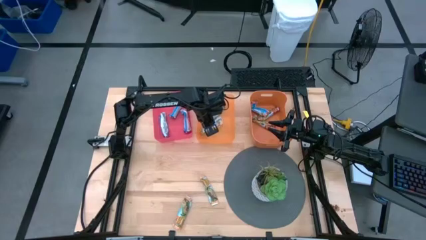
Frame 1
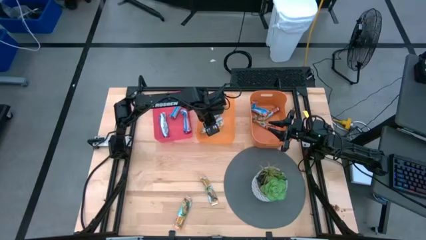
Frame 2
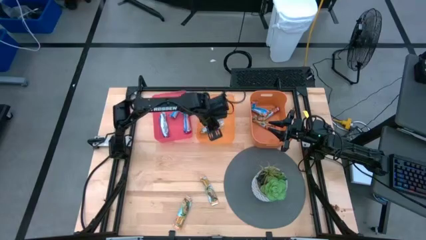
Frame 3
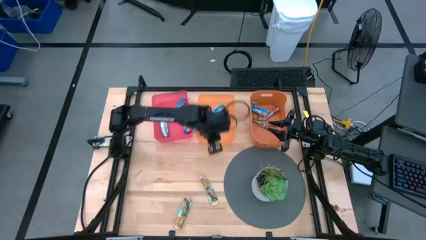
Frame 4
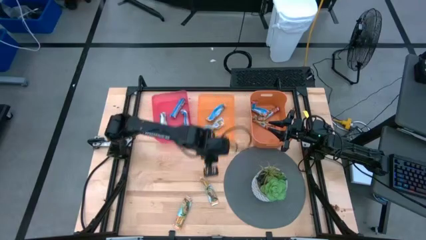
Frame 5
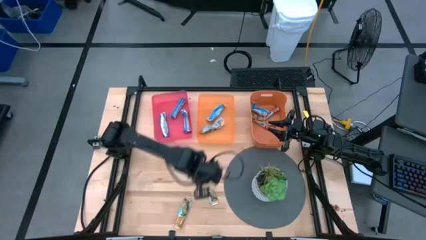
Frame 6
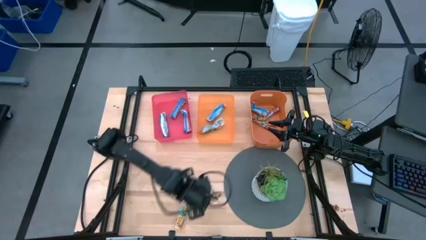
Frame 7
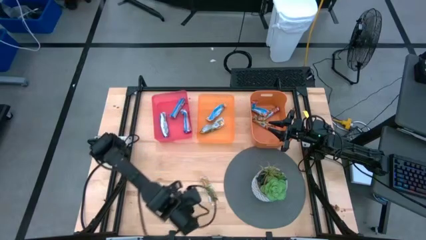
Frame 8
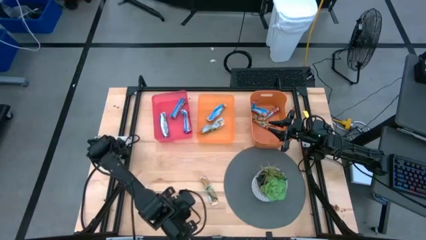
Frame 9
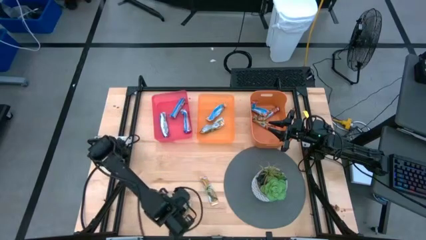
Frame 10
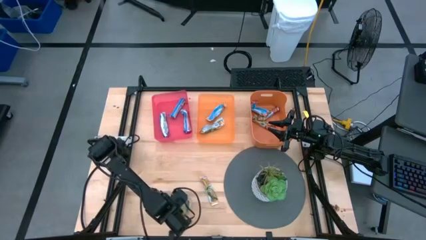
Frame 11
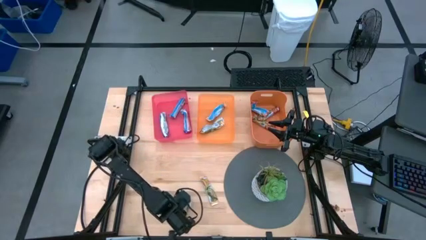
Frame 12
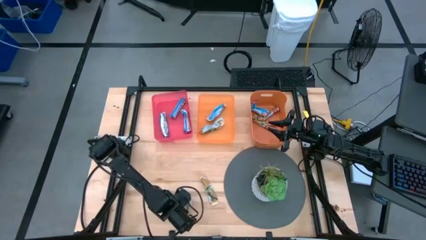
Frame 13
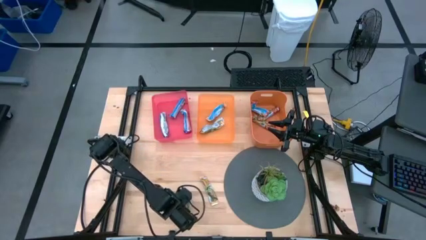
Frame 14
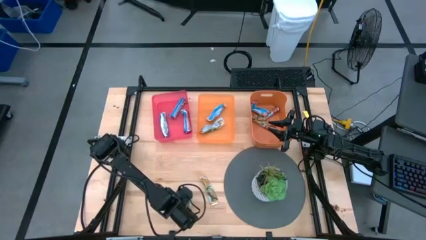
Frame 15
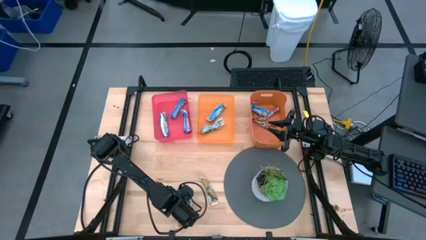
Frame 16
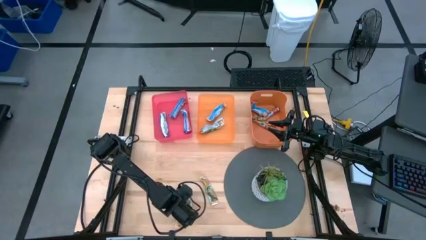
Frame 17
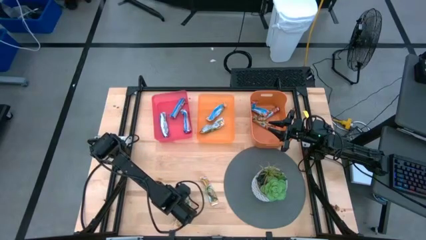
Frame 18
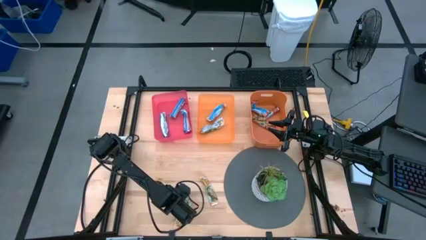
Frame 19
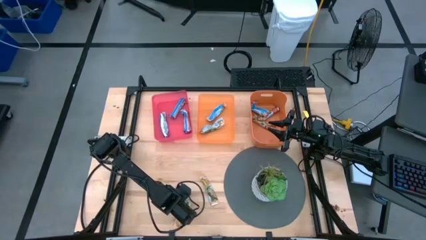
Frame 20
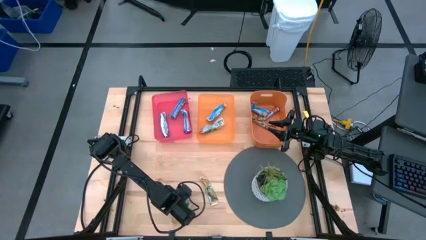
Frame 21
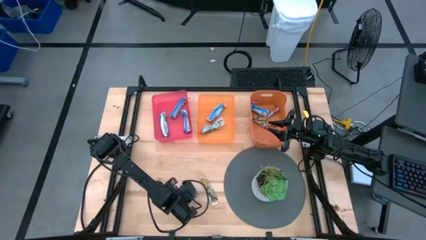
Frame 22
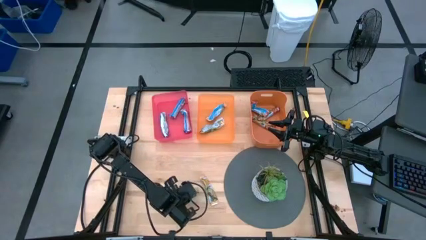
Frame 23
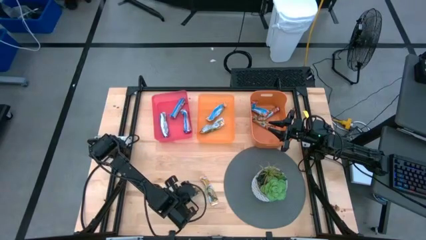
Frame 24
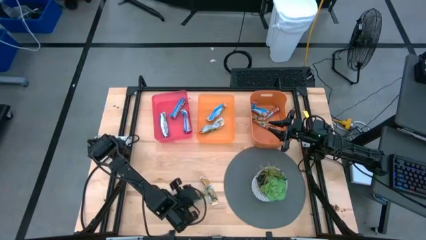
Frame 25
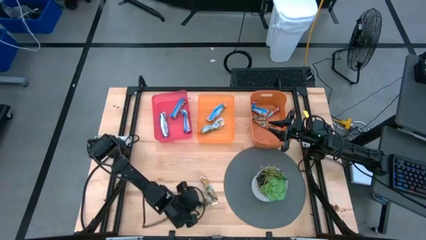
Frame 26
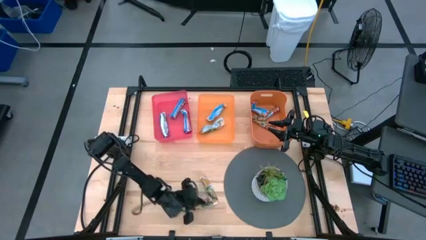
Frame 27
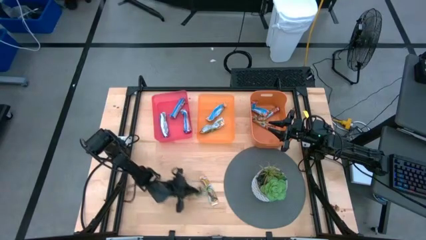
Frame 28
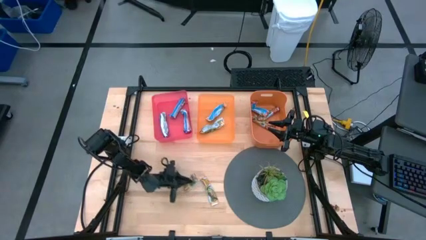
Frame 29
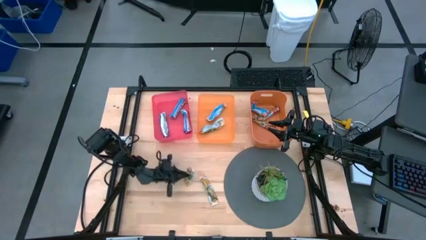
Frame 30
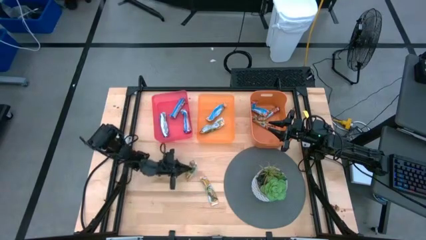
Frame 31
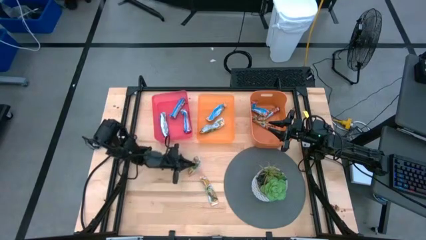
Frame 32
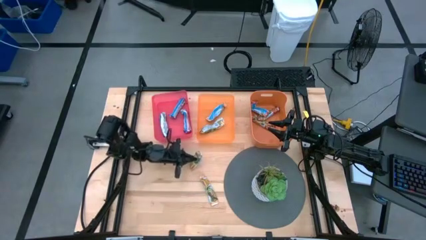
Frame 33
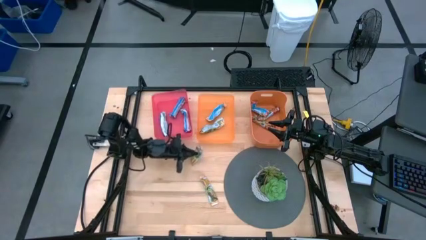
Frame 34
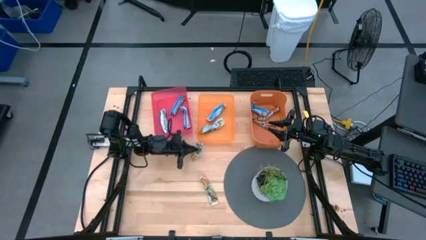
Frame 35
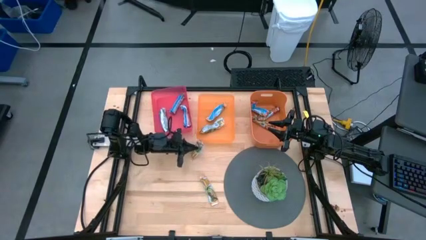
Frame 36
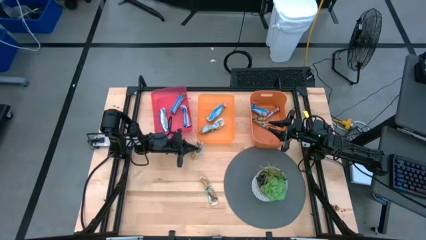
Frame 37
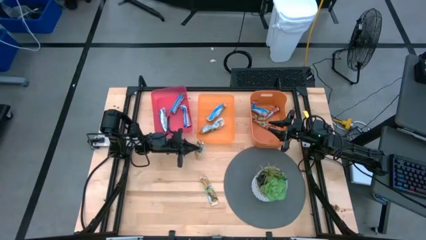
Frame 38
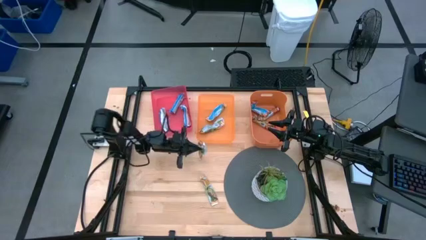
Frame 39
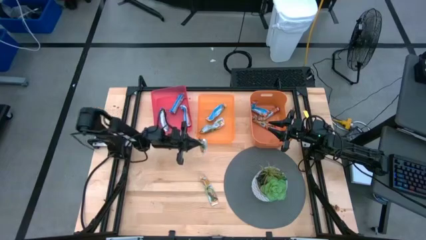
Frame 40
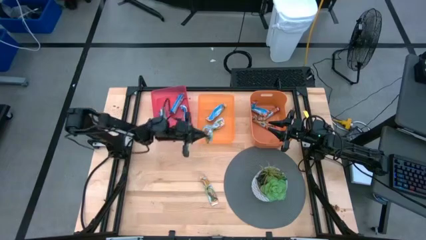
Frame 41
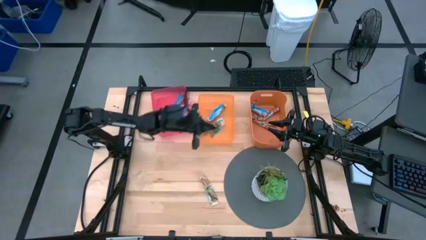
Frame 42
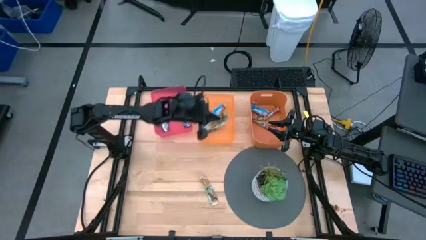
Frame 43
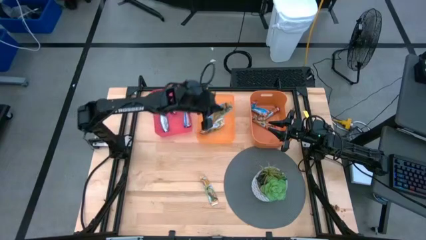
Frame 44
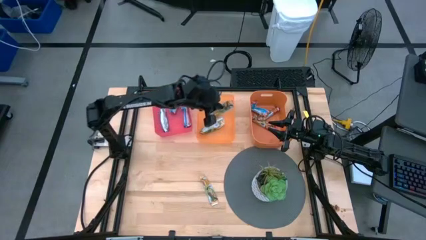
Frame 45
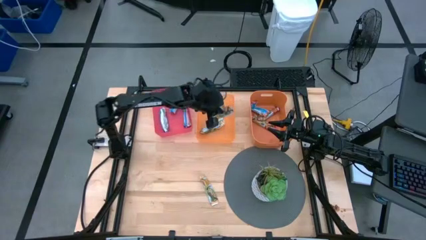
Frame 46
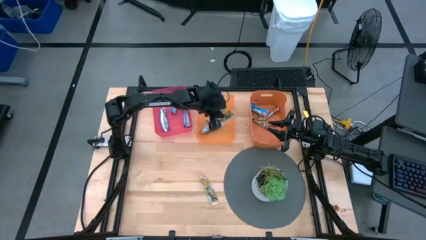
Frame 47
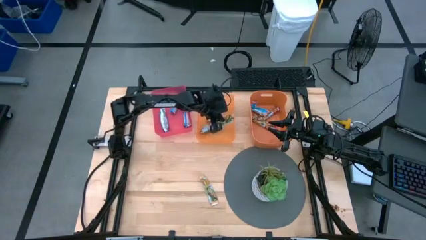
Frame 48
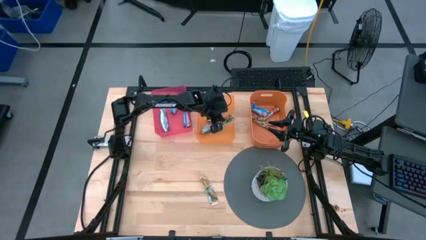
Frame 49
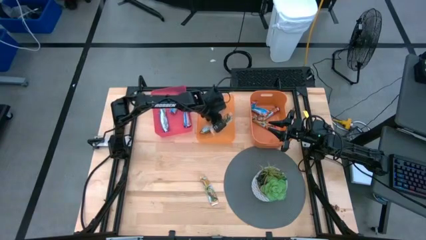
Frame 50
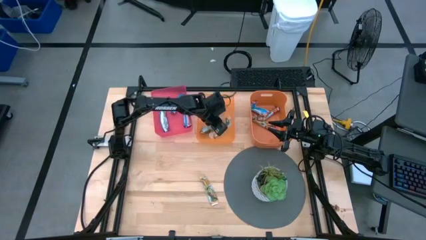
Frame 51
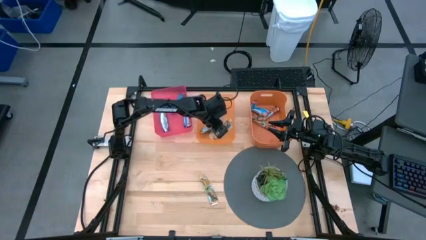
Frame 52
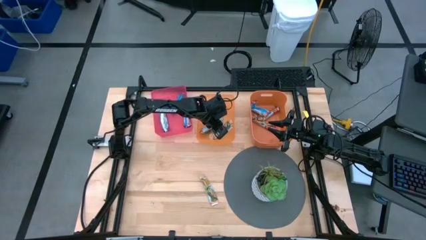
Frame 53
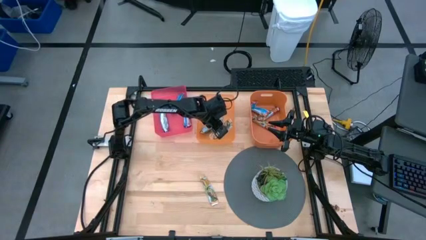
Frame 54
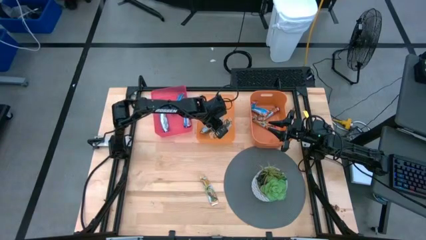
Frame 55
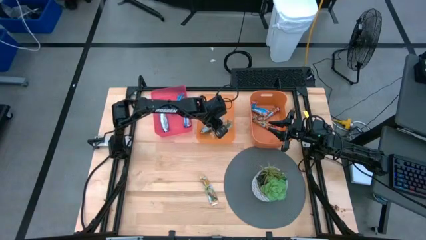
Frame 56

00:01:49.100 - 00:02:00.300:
Task: Pick and place Granola Bars by type
Put the bottom yellow granola bar into the left orange bin

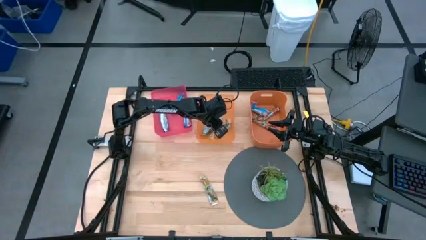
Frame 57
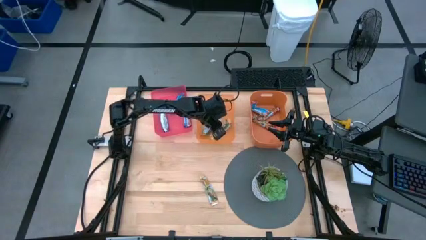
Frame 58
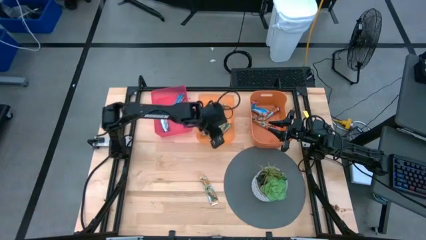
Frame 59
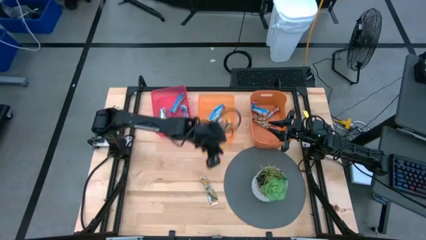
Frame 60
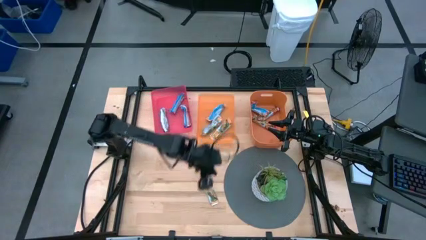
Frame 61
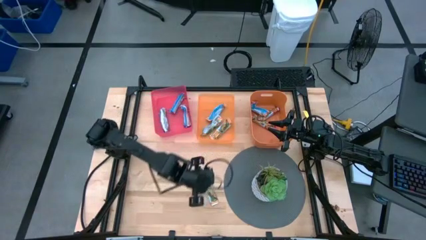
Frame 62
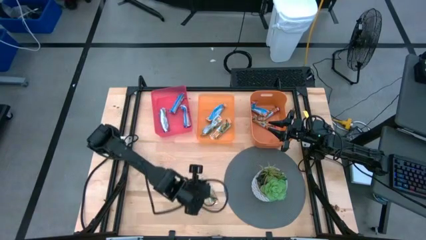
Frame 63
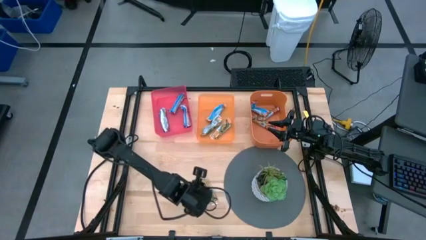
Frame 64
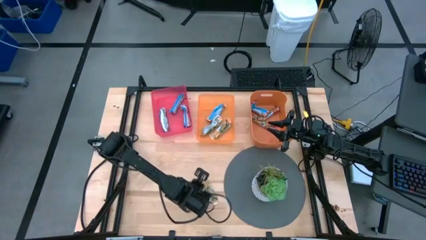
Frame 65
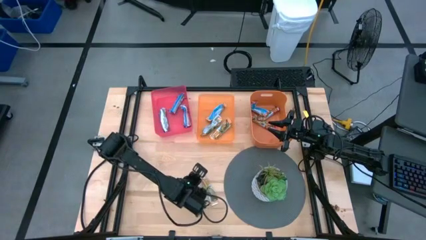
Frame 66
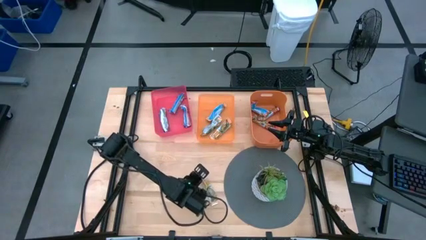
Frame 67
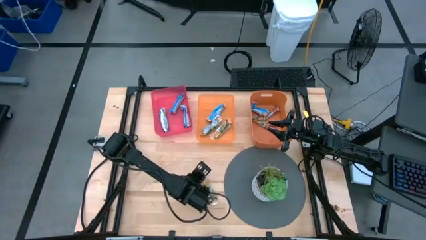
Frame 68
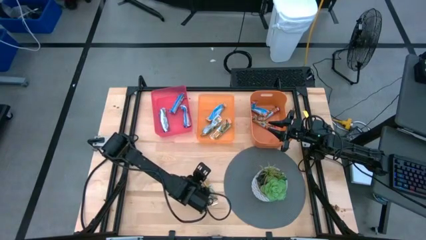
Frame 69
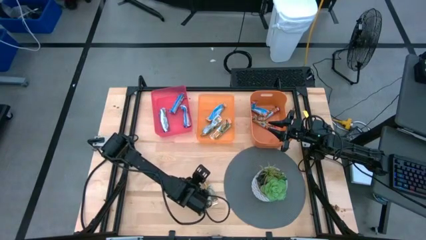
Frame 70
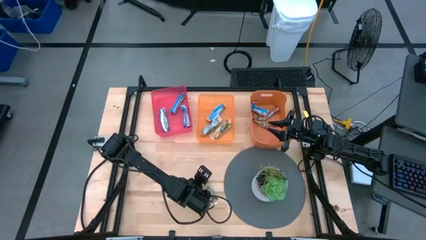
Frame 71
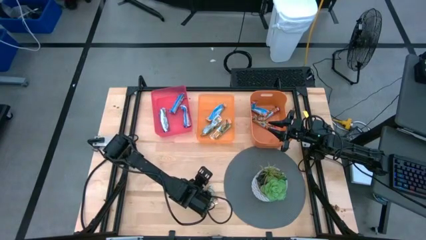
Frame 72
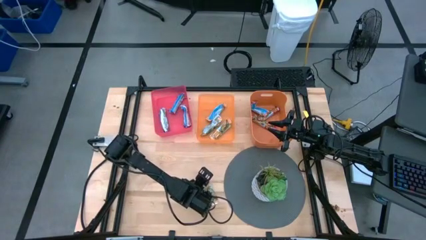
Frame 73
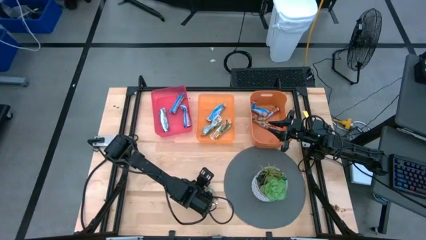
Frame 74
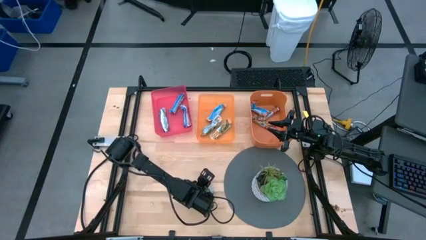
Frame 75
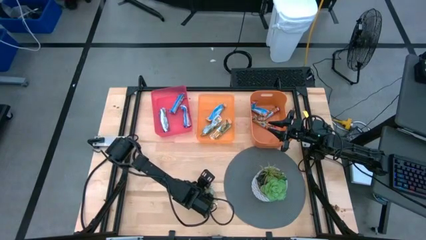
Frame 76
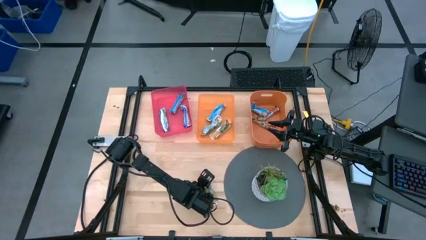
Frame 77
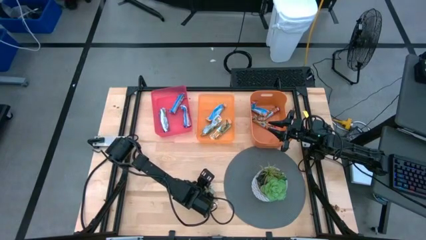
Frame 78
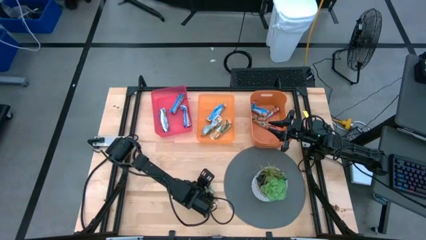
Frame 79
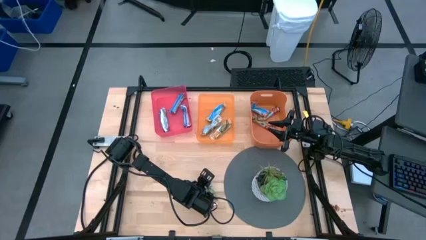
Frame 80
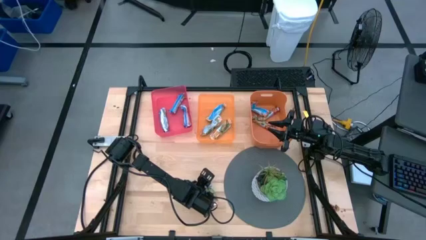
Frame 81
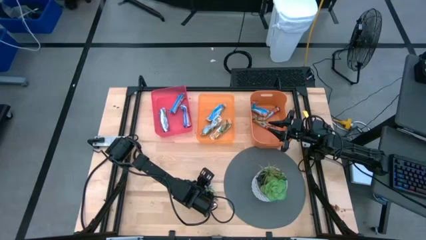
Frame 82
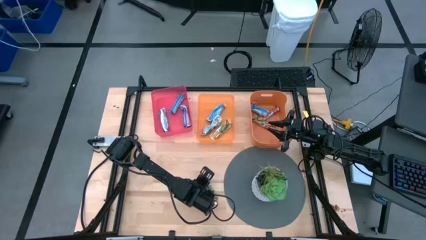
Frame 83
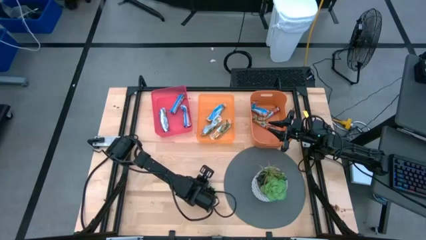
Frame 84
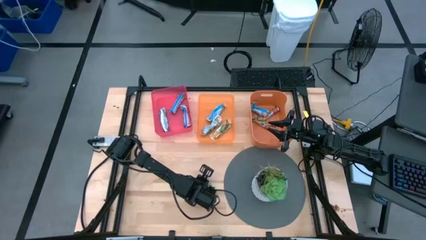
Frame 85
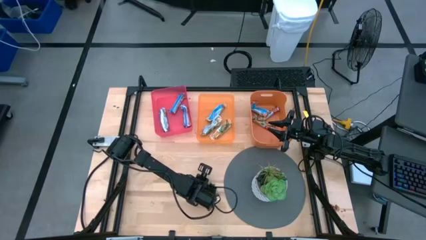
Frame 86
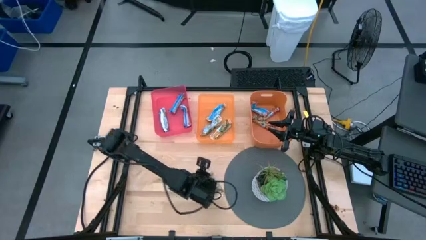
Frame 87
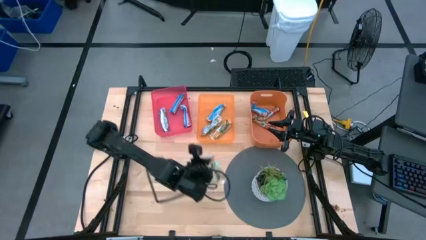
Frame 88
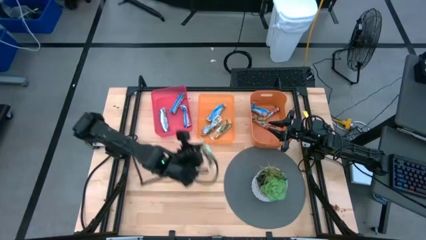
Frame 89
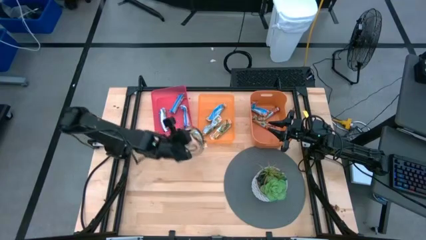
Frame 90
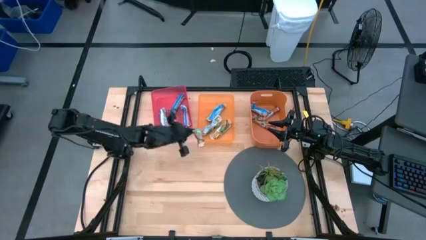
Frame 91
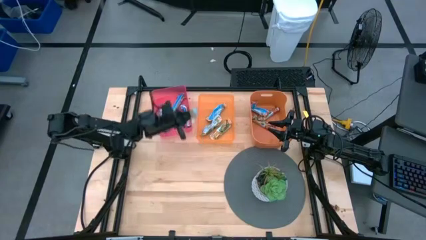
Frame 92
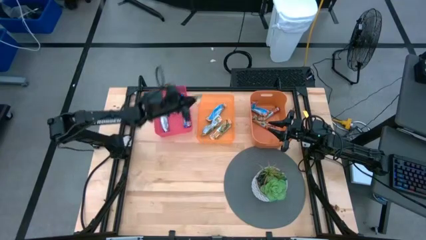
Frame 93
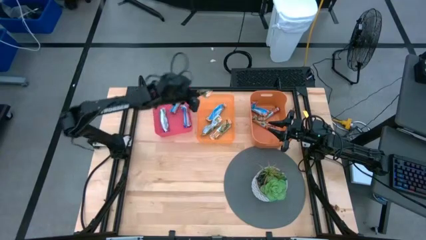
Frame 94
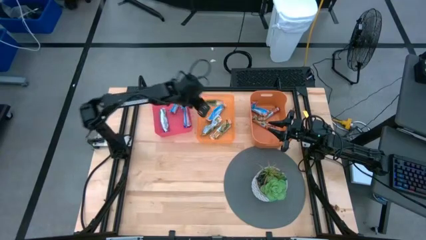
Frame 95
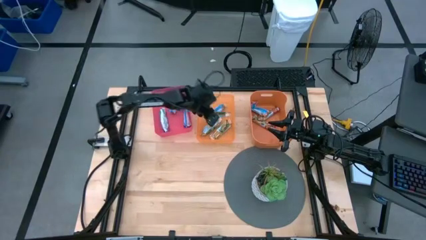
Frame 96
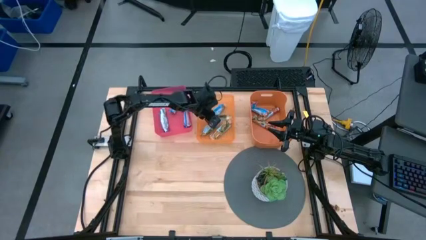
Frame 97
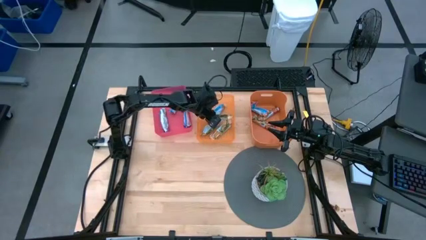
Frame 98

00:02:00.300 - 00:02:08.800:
Put the yellow granola bar into the left orange bin
